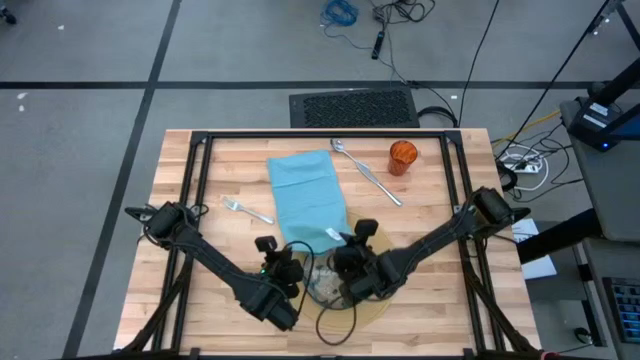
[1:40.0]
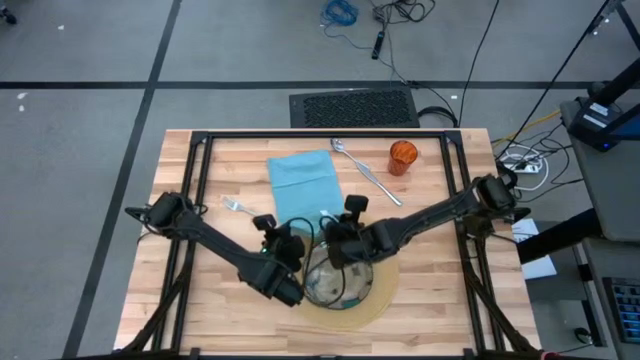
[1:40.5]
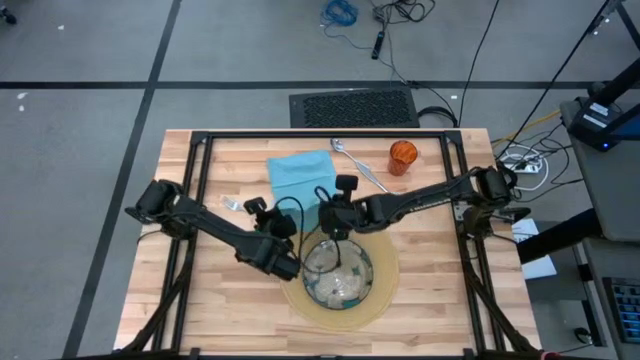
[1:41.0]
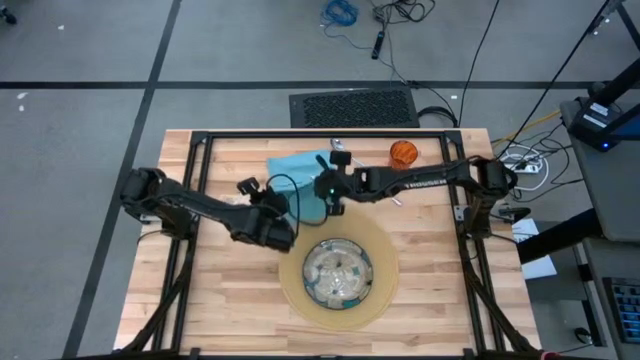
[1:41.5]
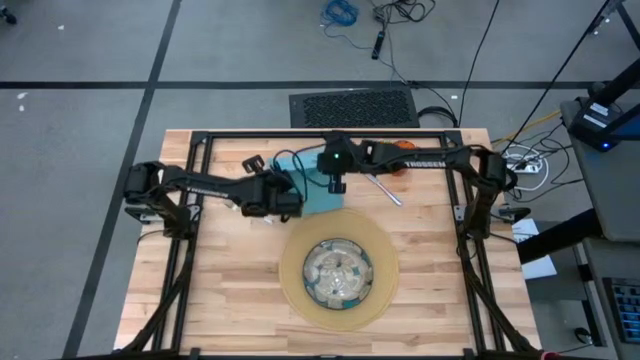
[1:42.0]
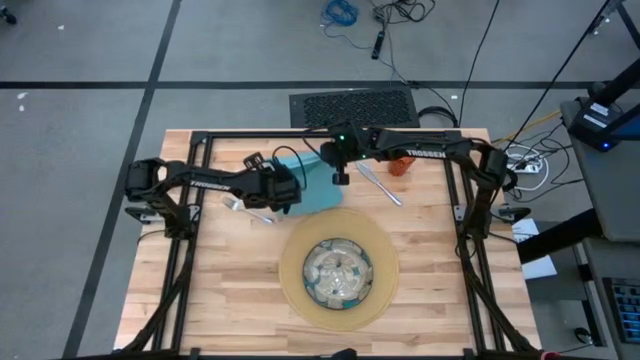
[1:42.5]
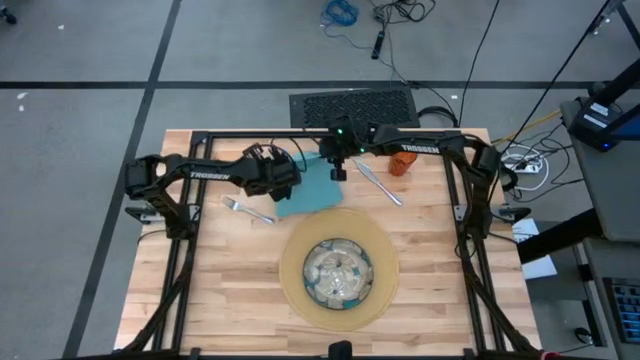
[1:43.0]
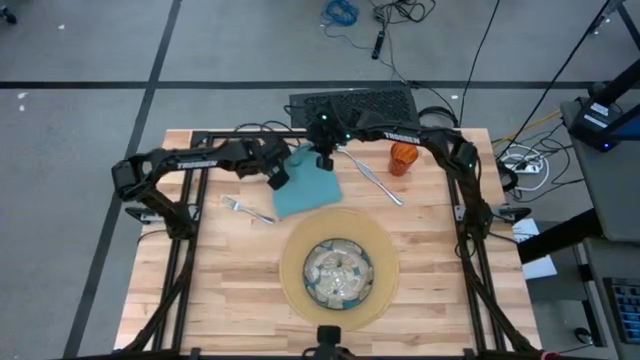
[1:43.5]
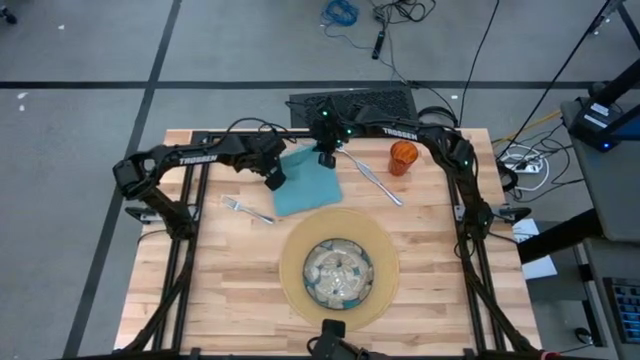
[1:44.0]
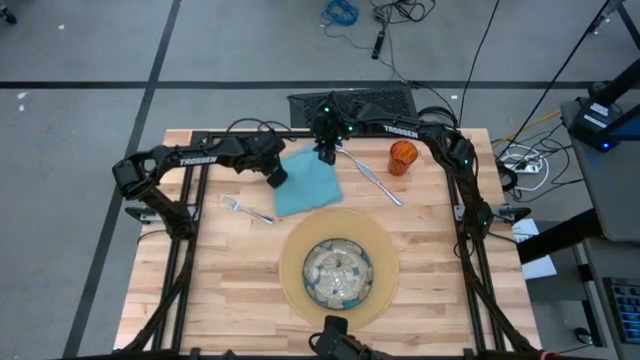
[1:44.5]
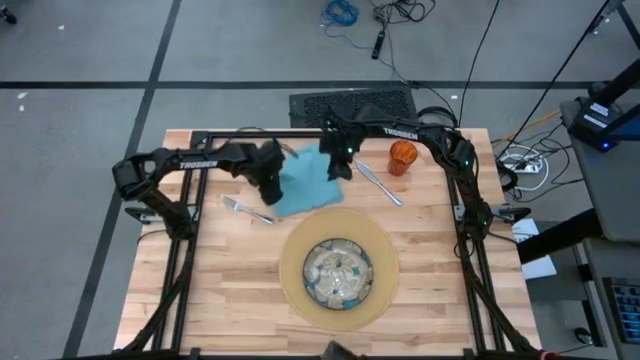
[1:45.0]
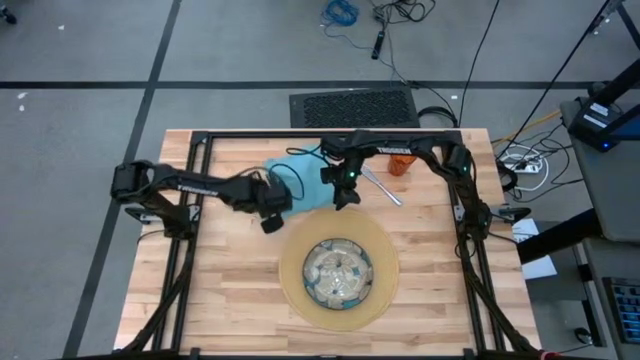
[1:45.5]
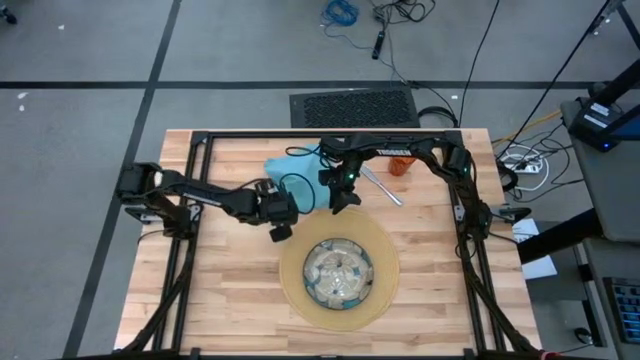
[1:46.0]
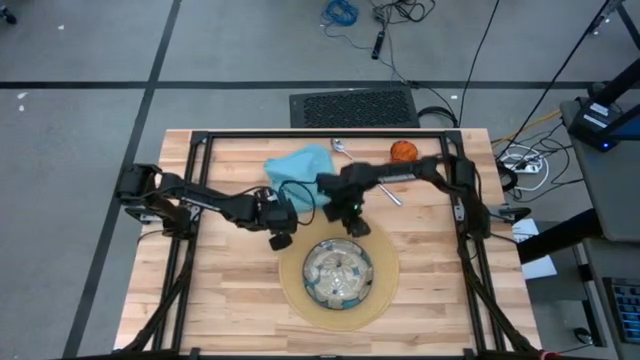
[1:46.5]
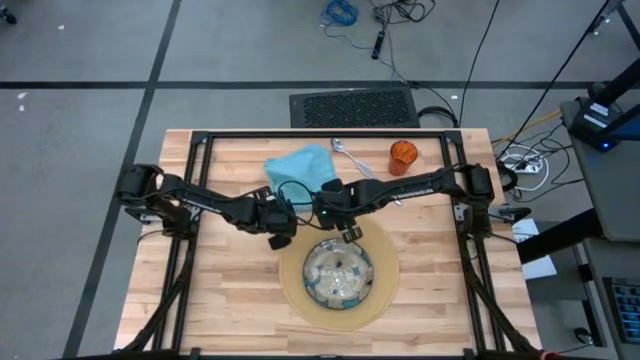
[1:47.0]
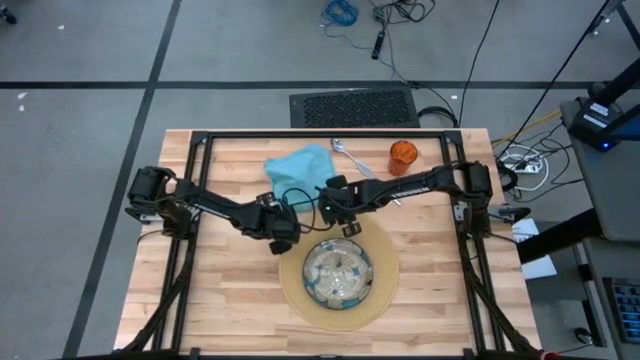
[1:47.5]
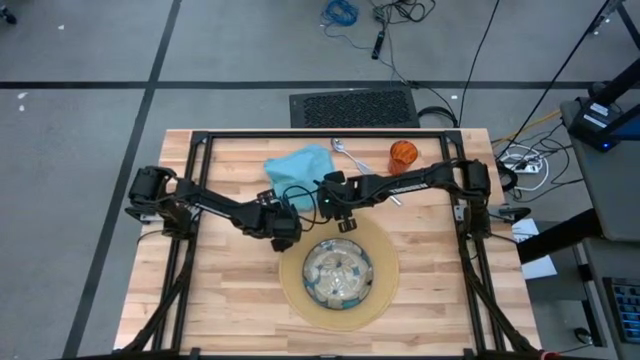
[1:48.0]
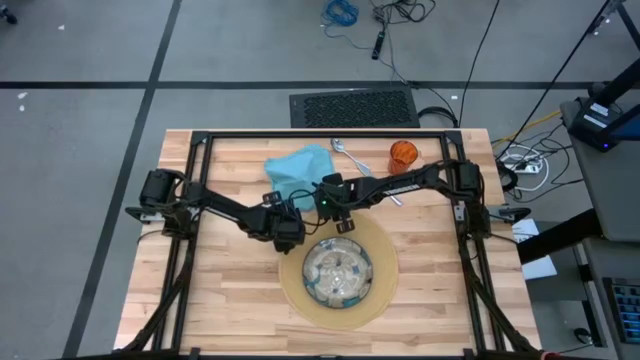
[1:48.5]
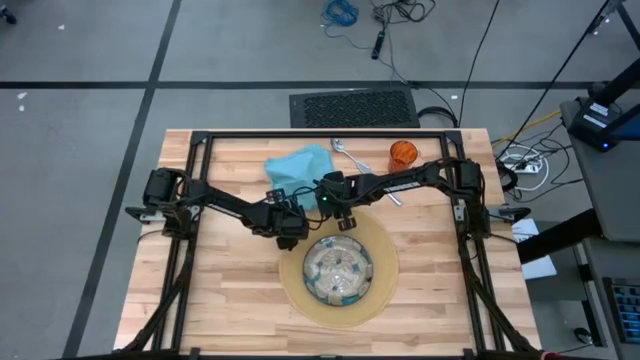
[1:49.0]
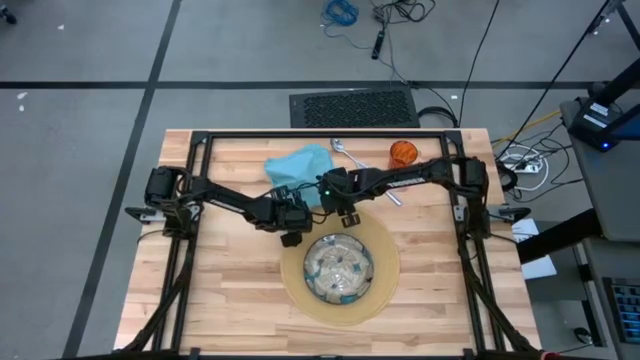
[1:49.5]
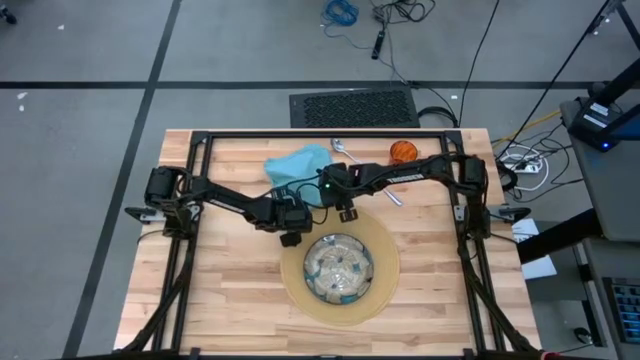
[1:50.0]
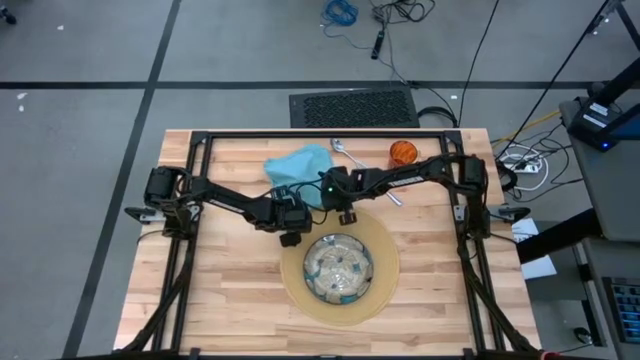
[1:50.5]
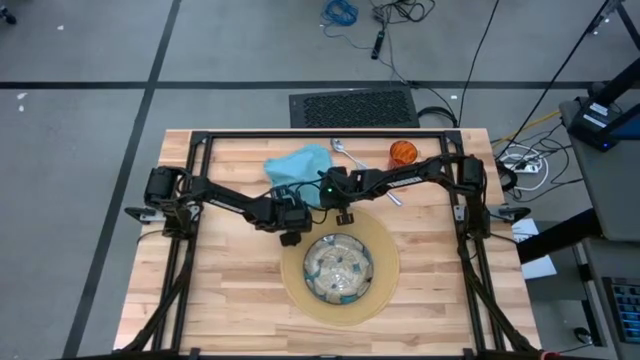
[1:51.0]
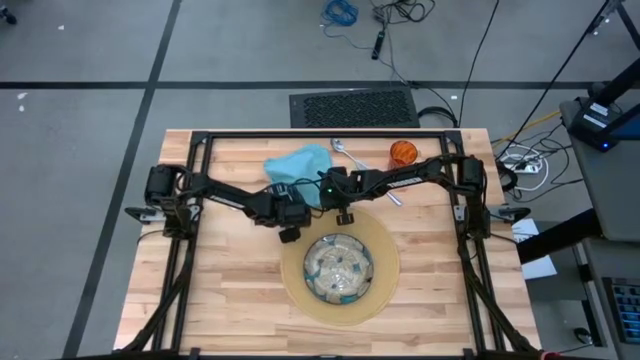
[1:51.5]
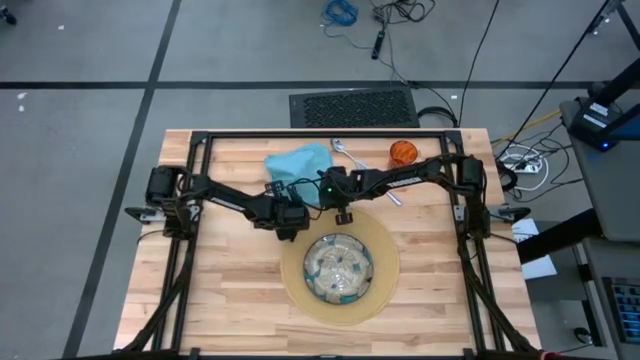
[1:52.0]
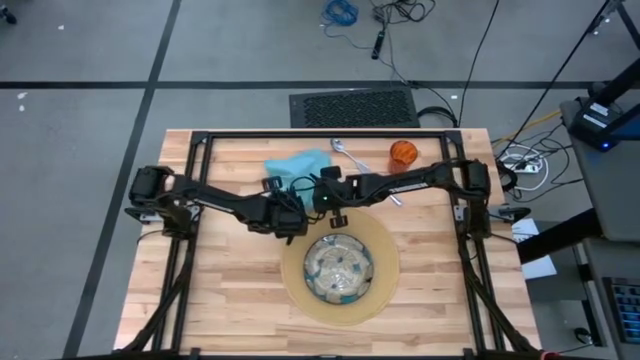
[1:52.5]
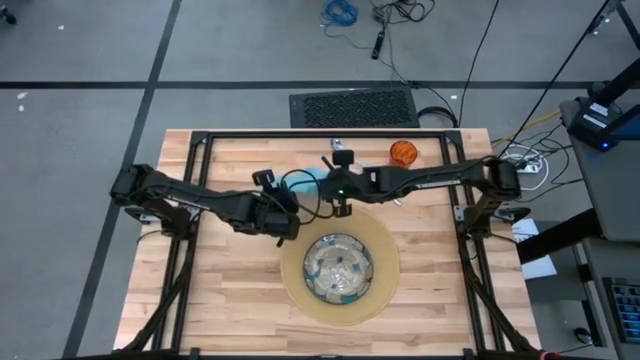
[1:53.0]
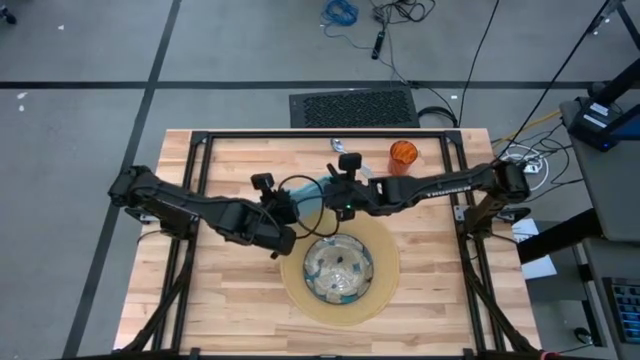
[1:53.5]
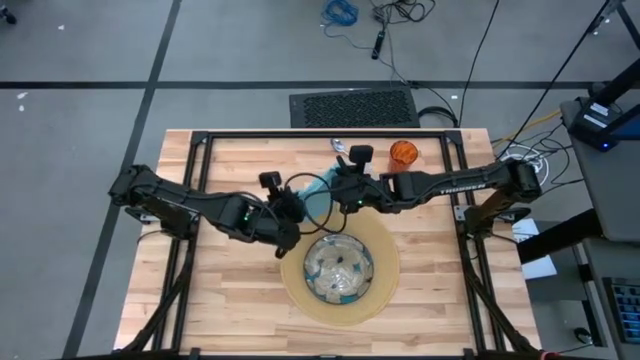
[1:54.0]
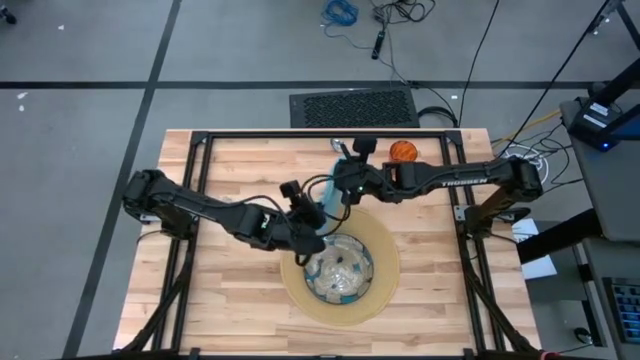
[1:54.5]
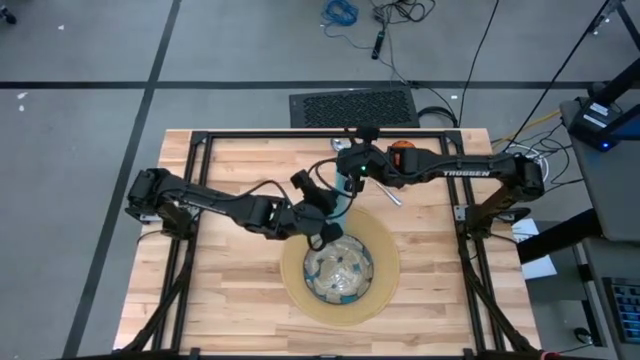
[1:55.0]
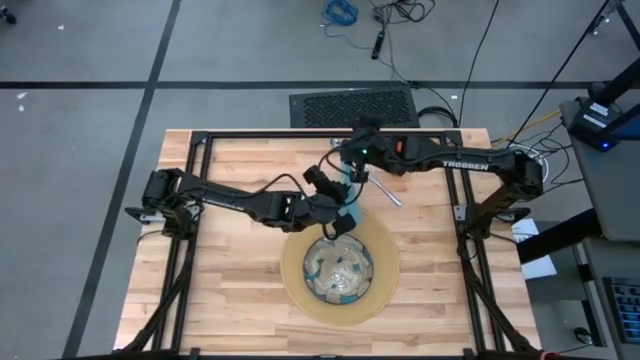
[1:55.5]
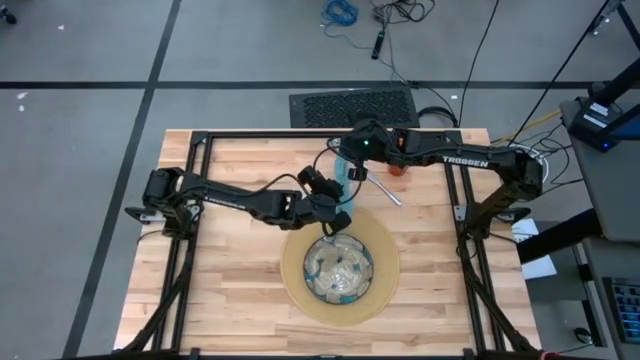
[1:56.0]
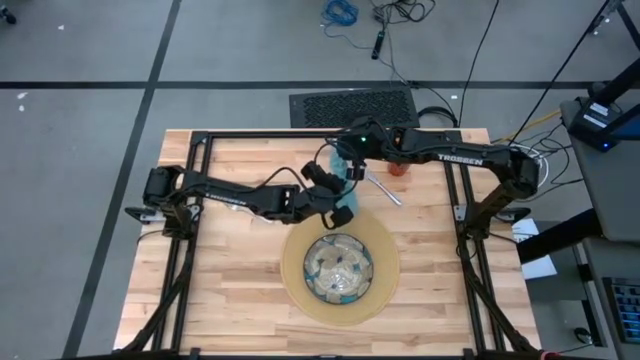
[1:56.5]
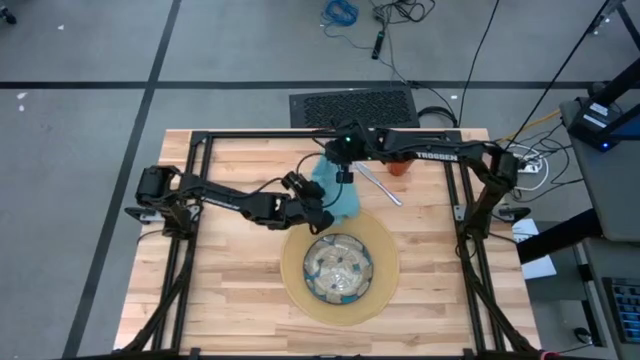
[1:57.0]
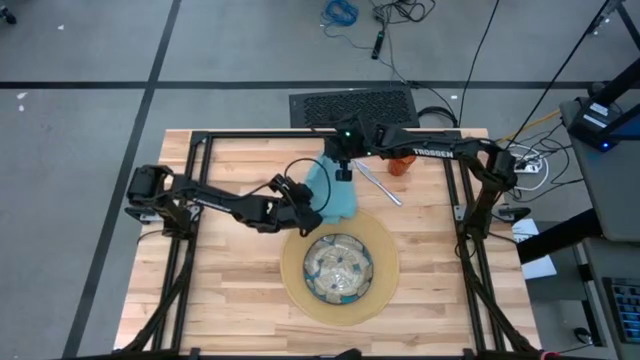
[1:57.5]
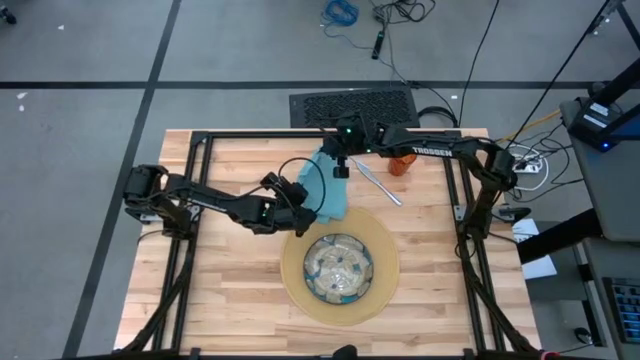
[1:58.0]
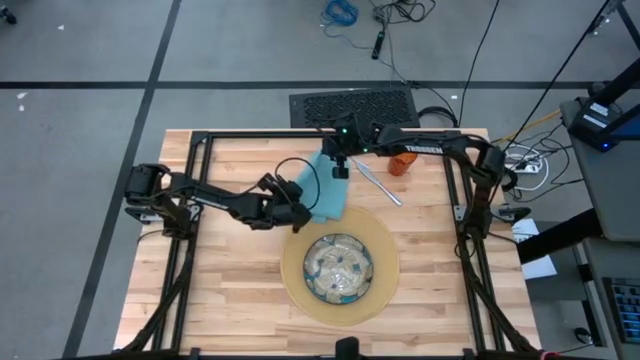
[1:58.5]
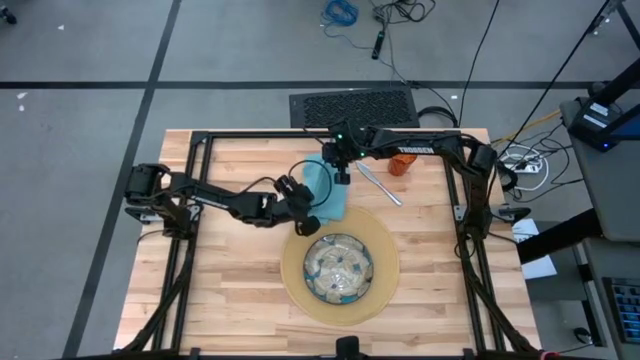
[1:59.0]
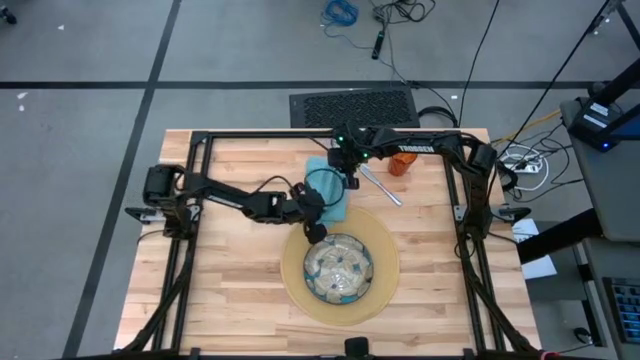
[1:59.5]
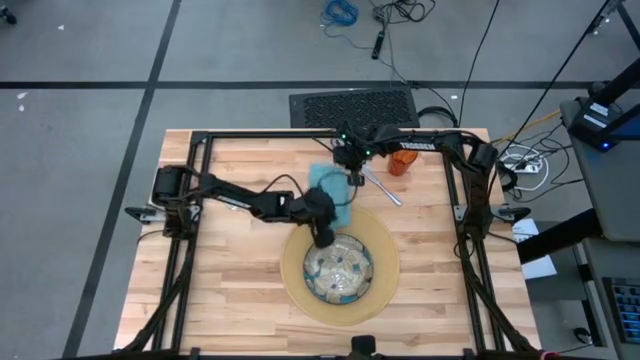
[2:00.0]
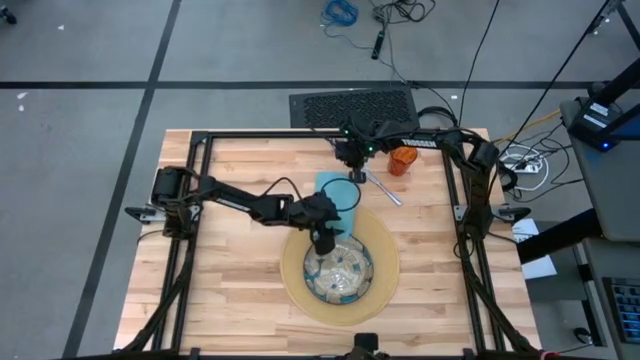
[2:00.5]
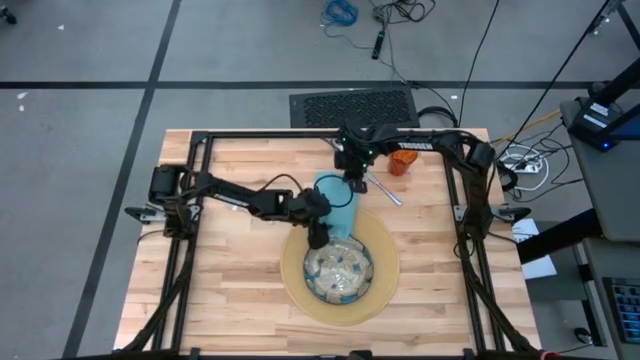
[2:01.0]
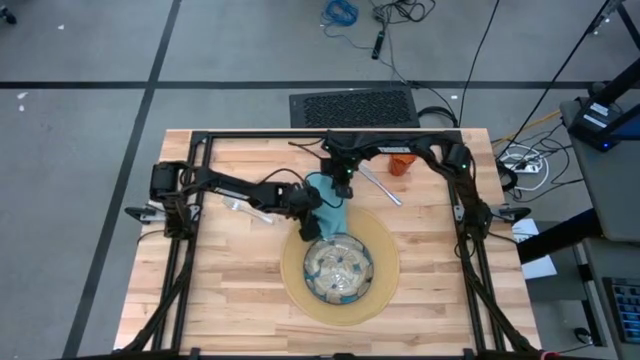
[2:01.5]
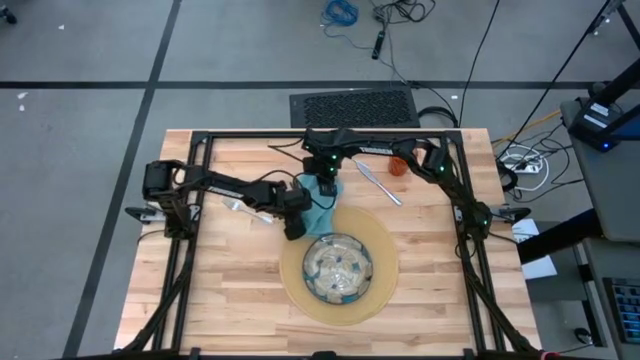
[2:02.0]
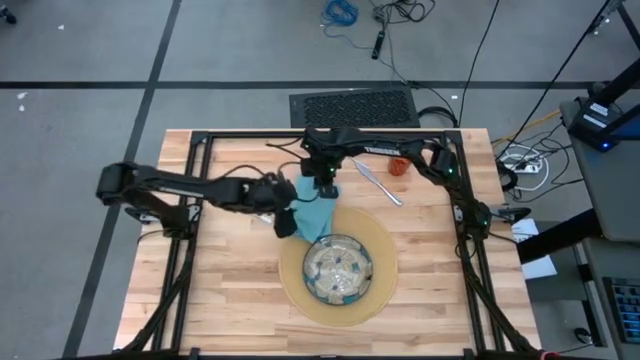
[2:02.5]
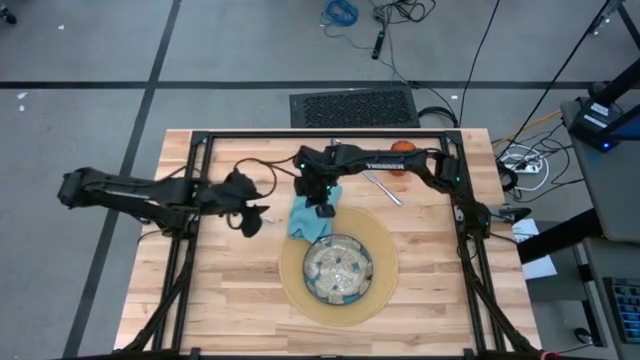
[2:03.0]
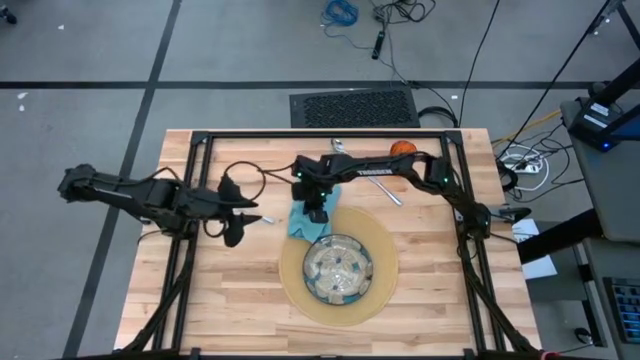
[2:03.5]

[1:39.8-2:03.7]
Task: Set table place
Fold the blue napkin
